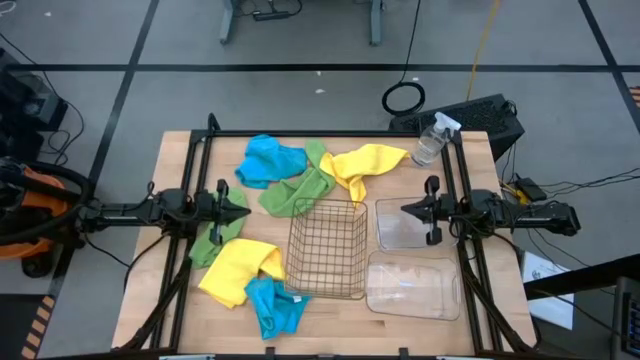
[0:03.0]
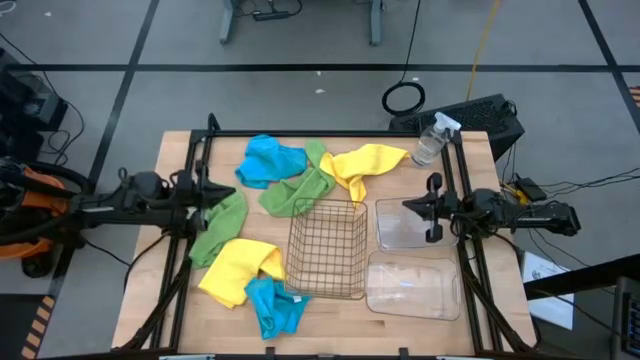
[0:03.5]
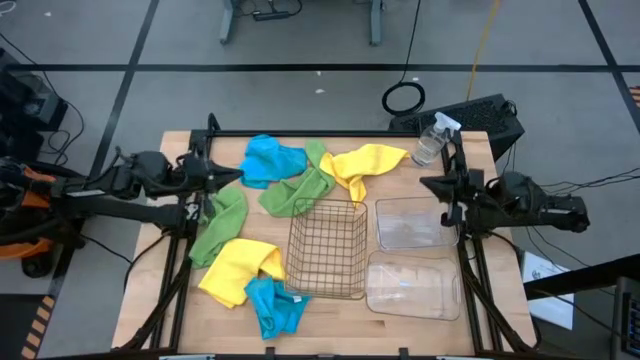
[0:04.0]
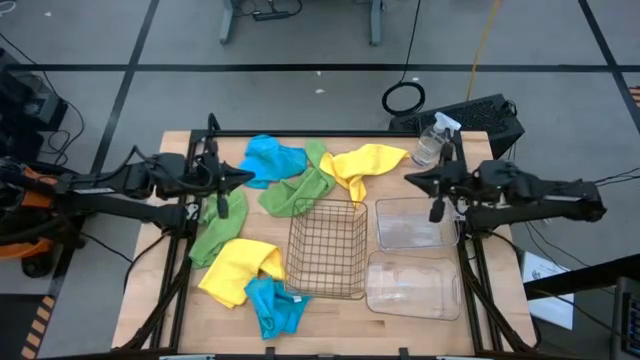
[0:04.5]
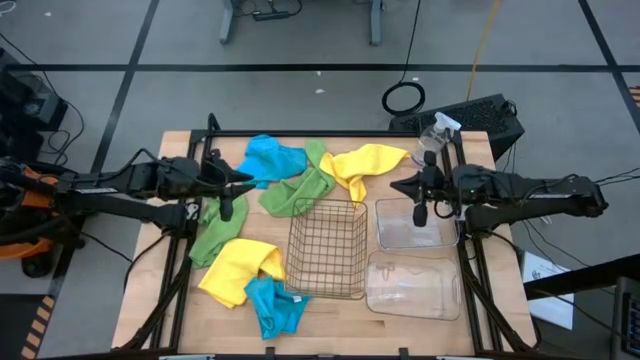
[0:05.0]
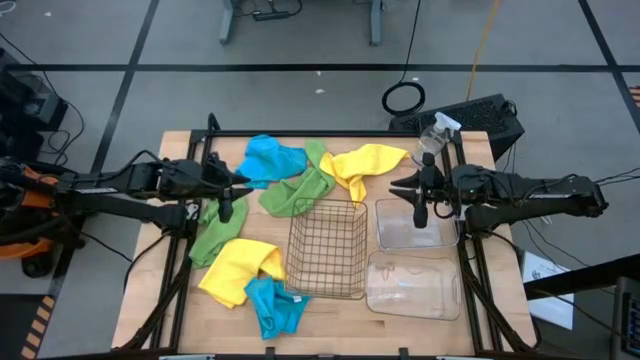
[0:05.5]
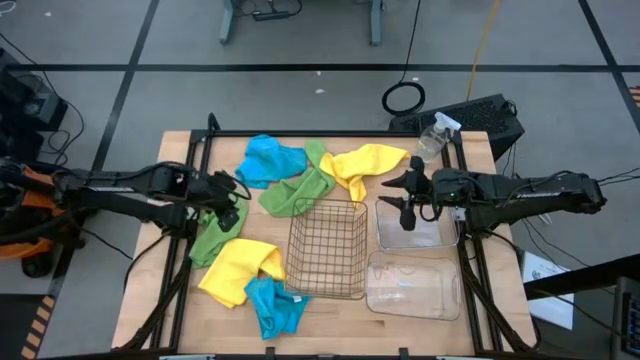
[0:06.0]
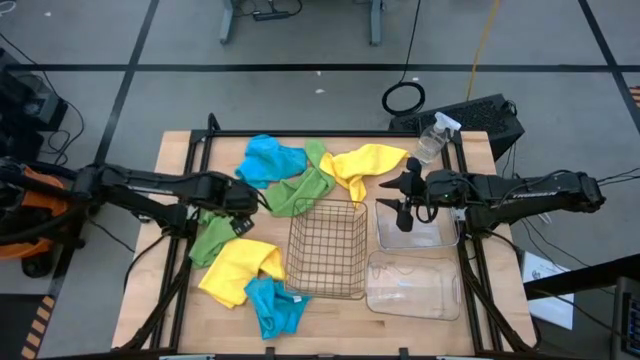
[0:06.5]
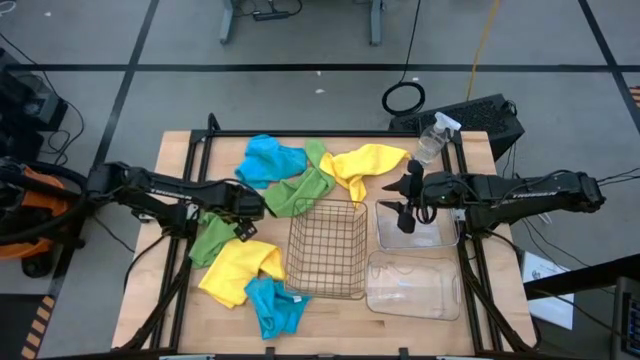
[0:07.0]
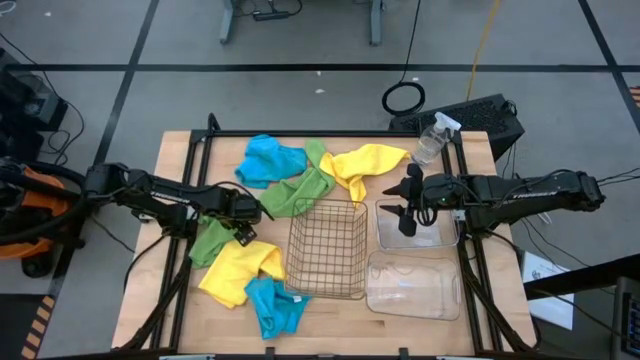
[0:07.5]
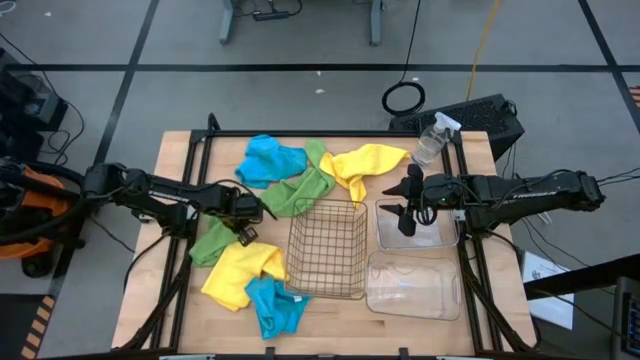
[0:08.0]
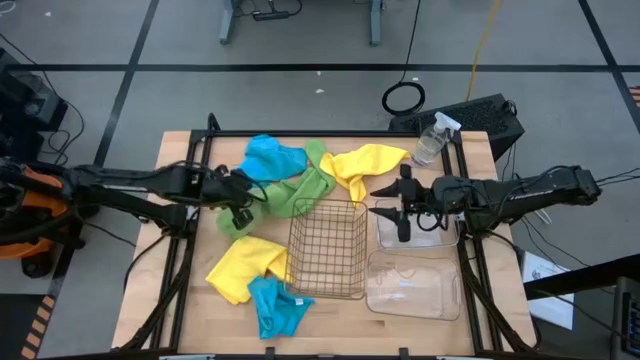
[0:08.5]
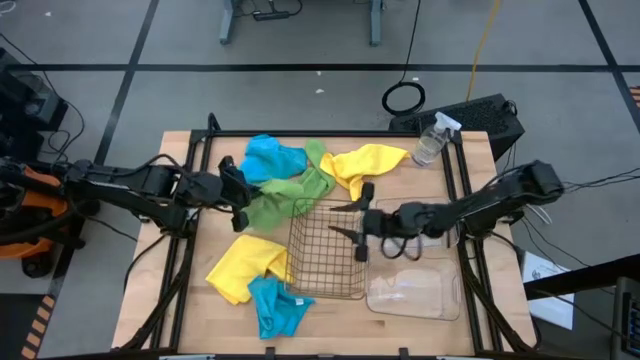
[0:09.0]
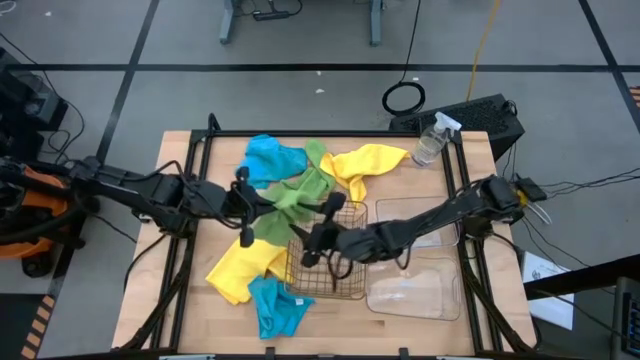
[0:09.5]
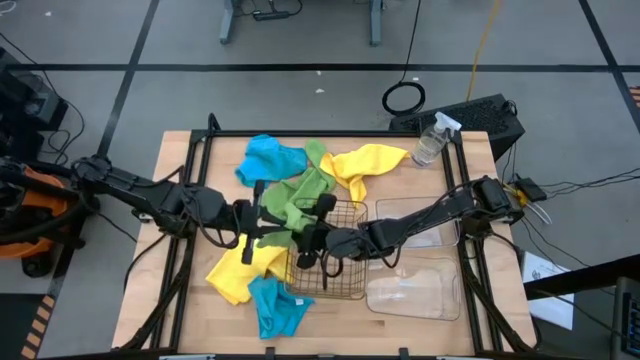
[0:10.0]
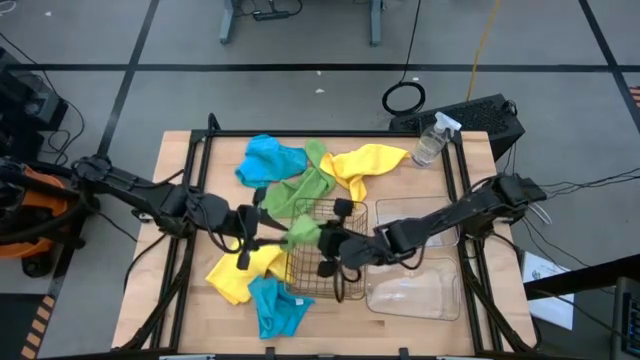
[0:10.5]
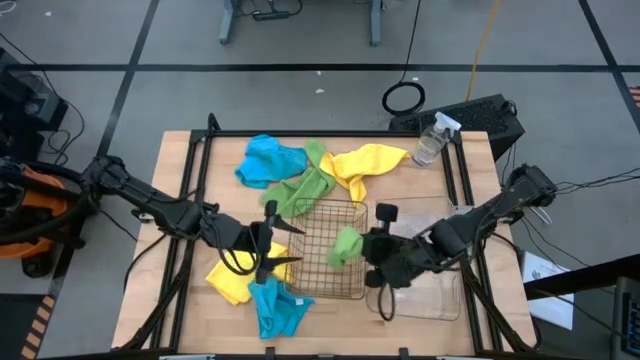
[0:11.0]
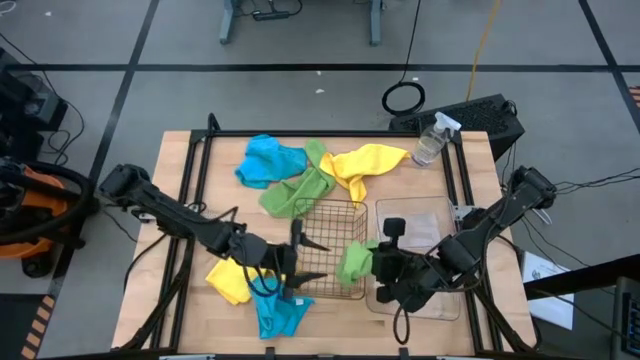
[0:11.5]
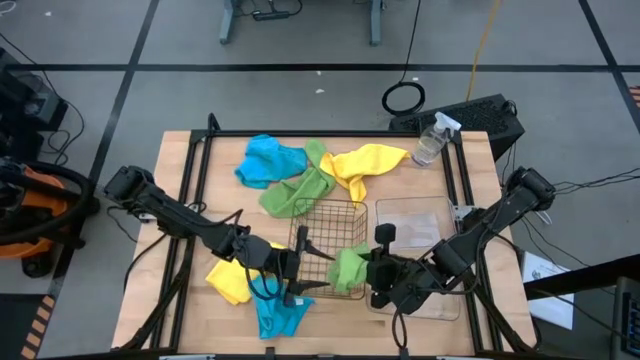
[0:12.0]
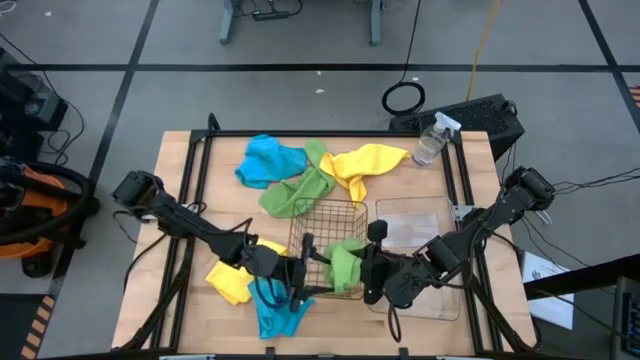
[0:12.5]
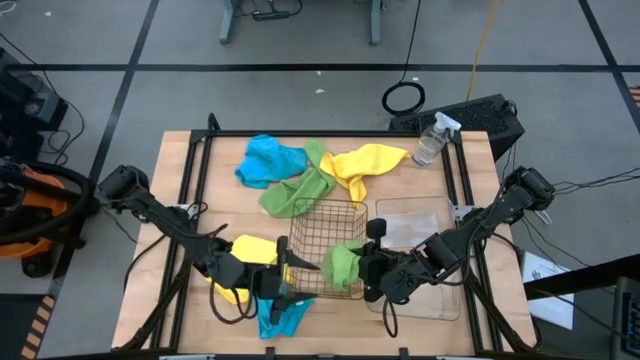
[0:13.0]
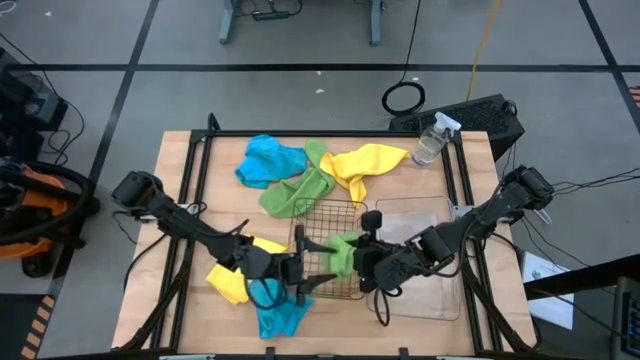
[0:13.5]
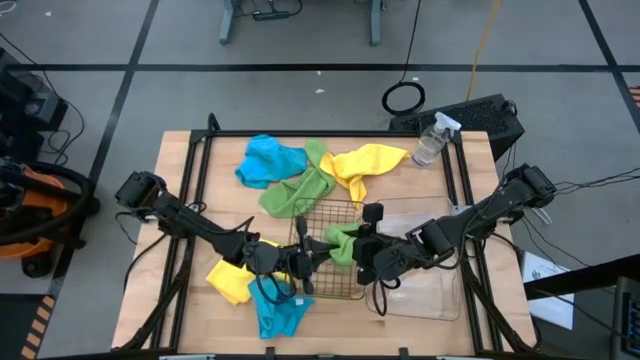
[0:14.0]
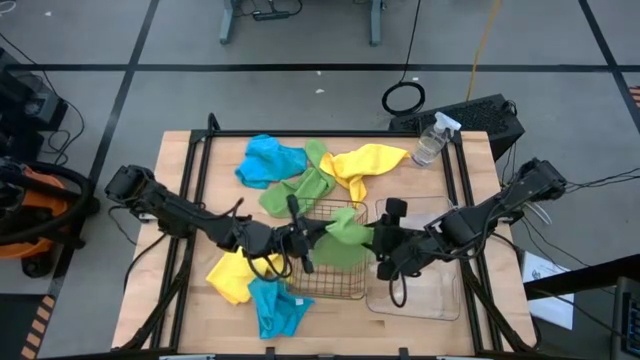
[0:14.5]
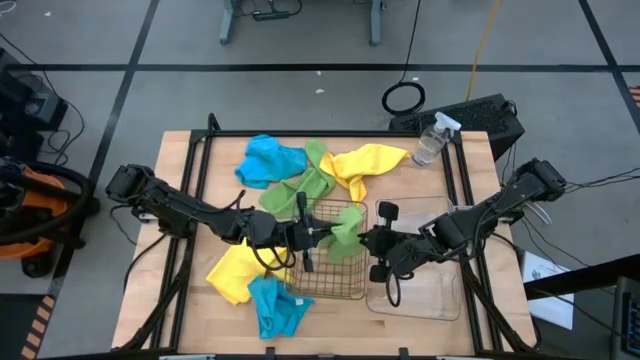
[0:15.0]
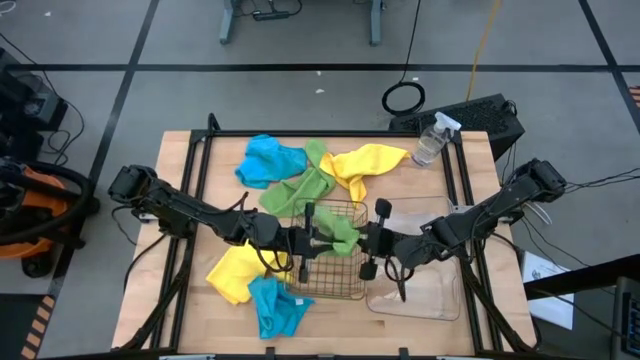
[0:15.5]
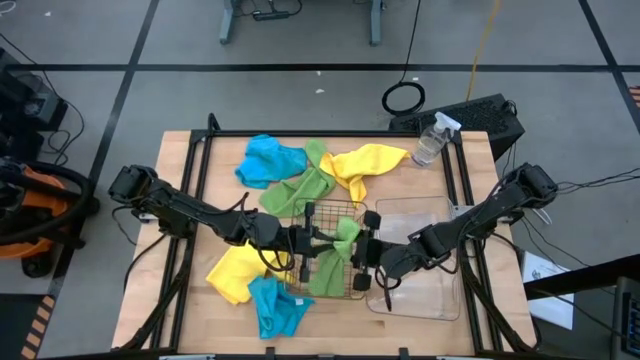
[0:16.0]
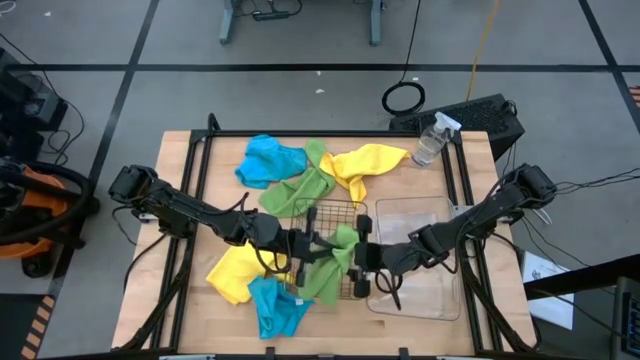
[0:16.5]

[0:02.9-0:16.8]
Task: Sort microfiber towel by color & place in baskets
Put the left green microfiber cloth into the top transparent bin

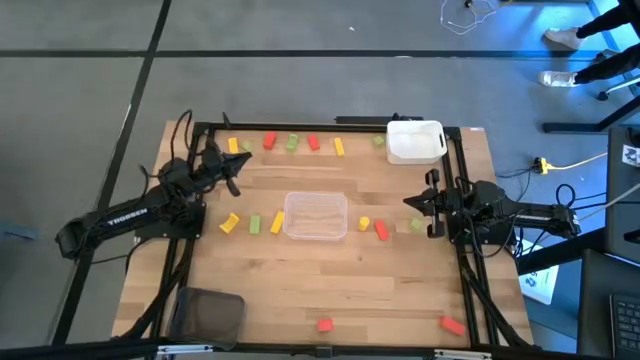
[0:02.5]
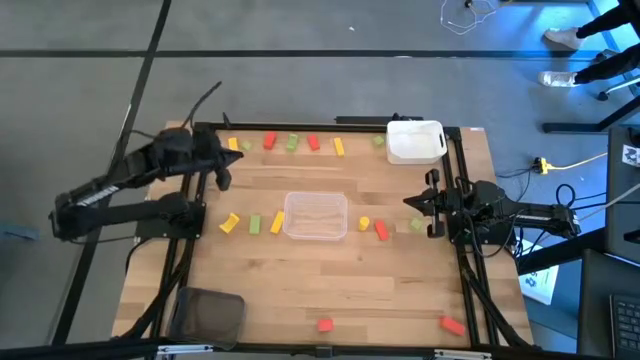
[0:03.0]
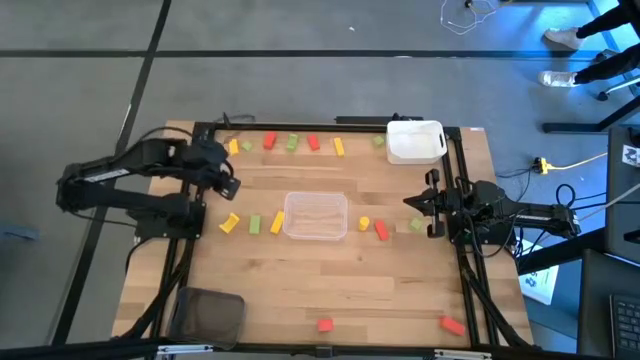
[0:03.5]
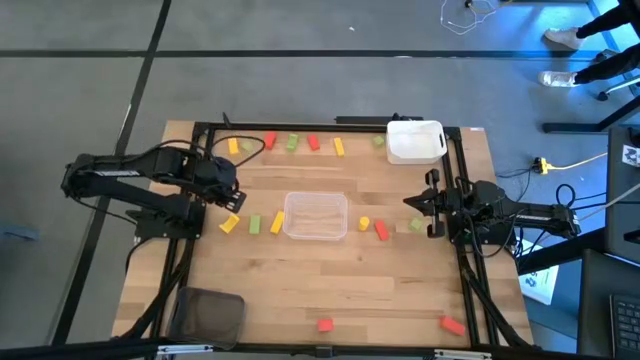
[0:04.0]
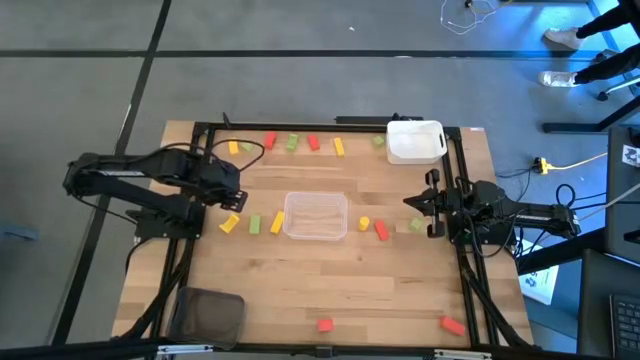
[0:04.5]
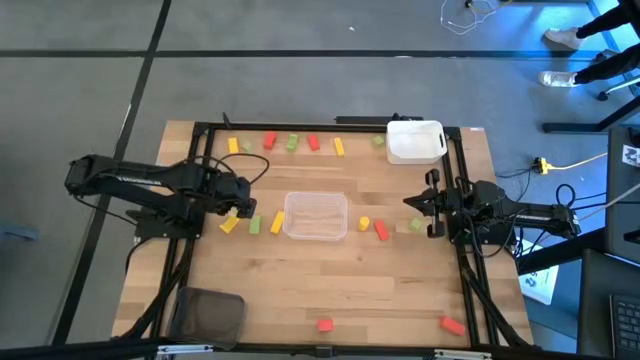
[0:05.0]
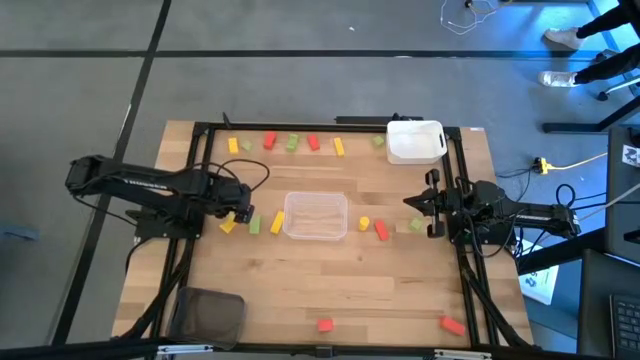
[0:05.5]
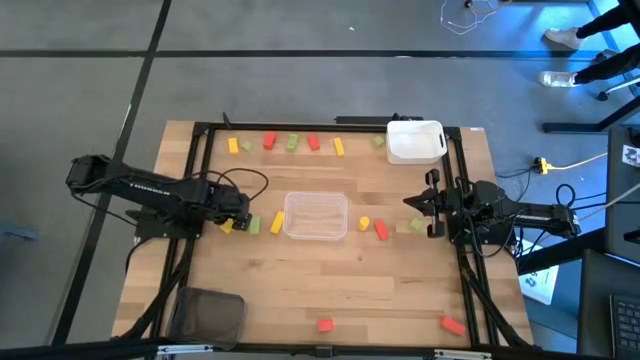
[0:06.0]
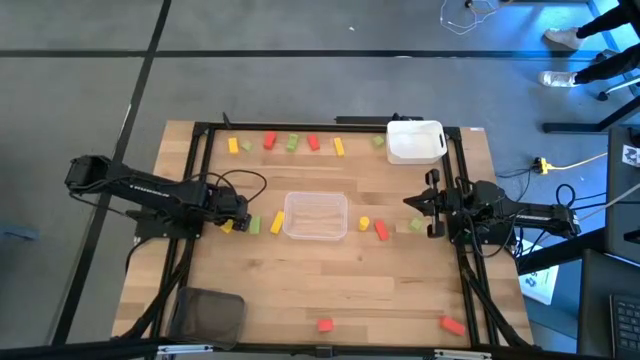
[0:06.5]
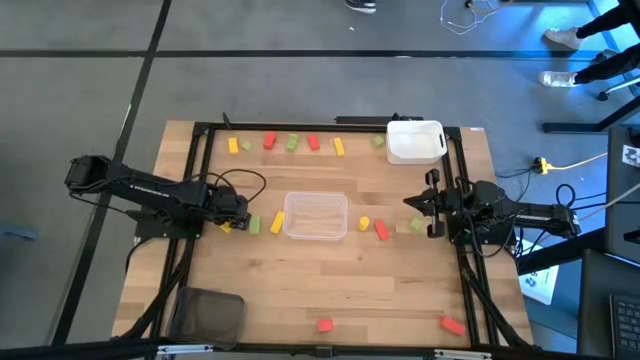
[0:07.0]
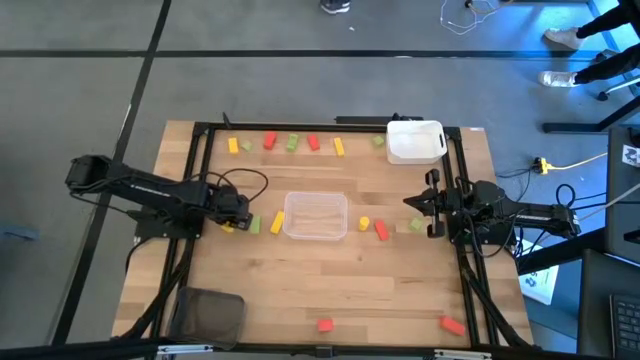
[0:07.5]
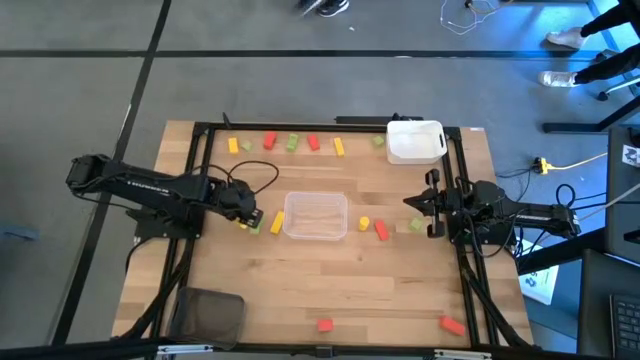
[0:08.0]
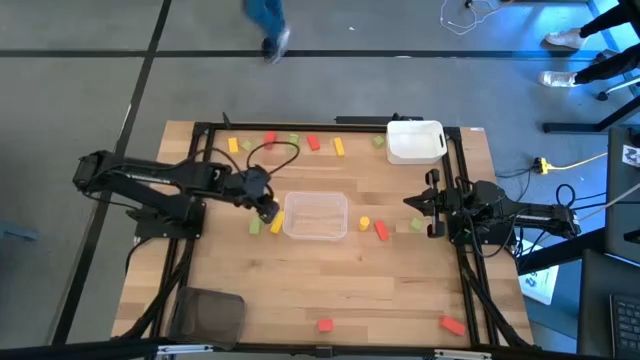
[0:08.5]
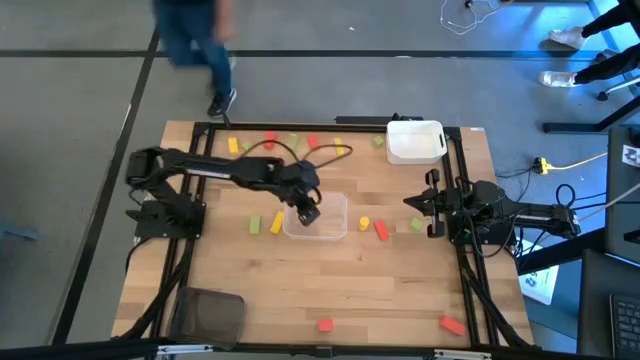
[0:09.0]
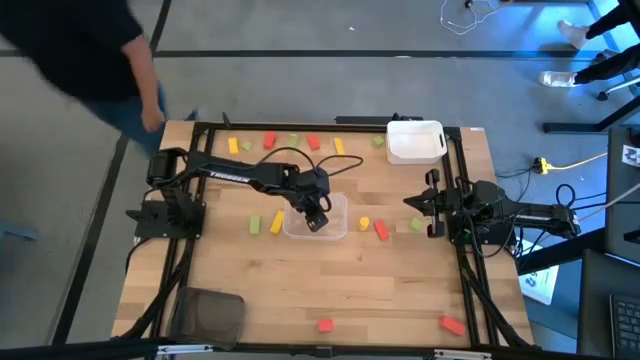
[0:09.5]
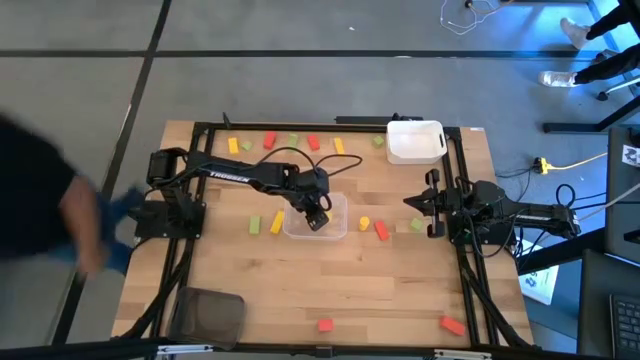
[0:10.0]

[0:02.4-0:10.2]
Task: Sort & place blocks by color
Put the yellow block into the transparent bin
